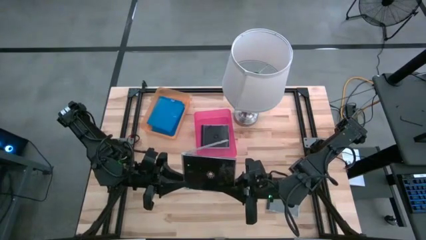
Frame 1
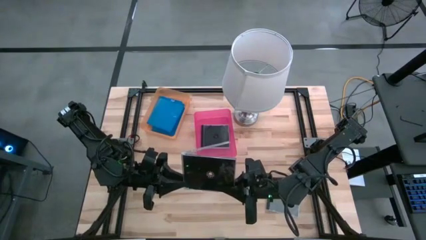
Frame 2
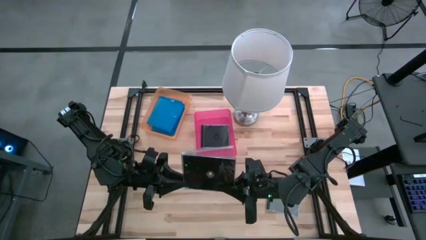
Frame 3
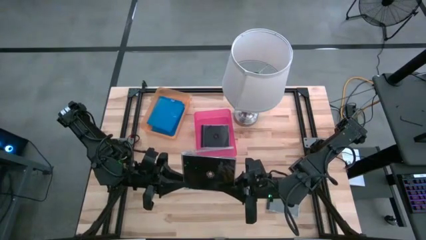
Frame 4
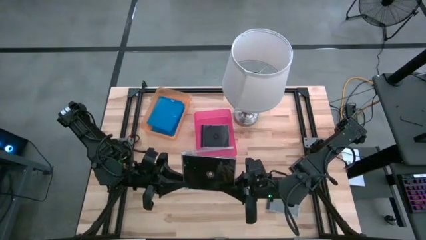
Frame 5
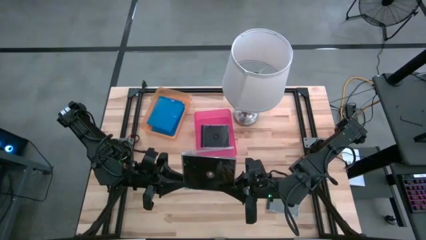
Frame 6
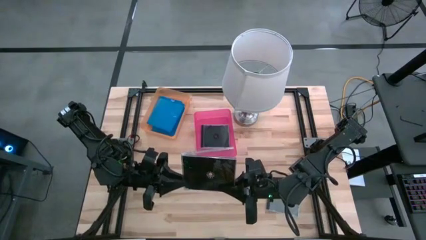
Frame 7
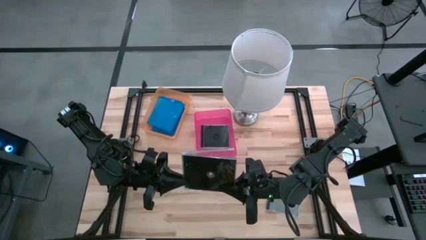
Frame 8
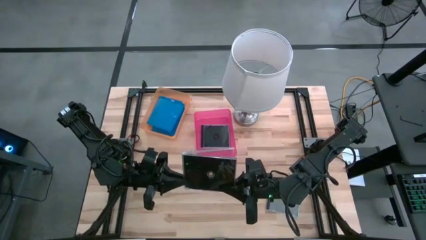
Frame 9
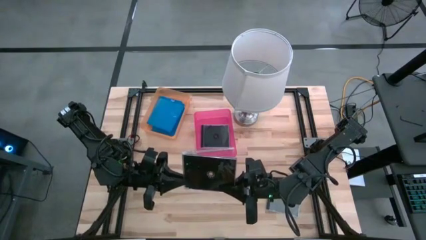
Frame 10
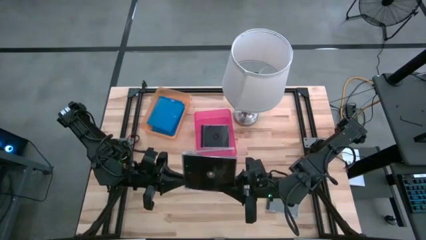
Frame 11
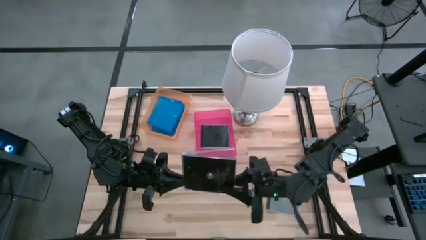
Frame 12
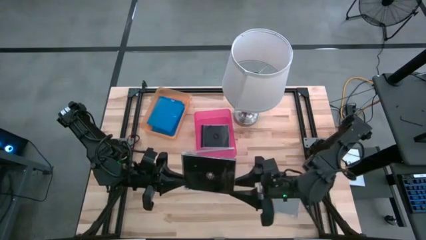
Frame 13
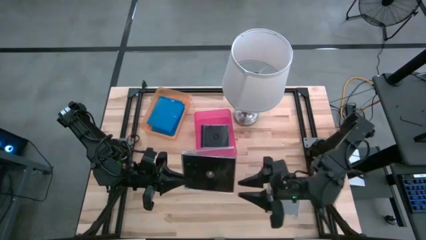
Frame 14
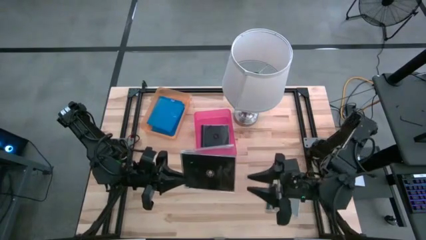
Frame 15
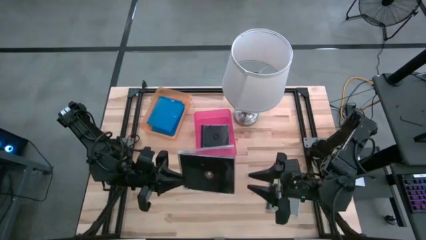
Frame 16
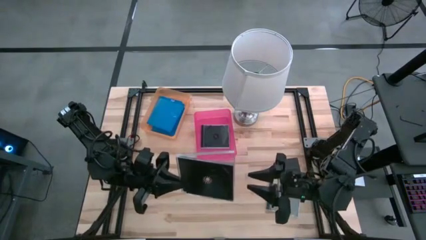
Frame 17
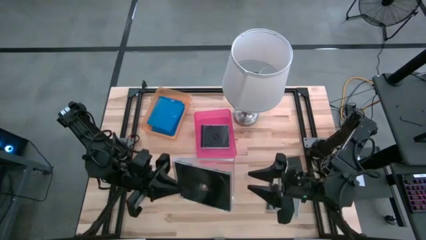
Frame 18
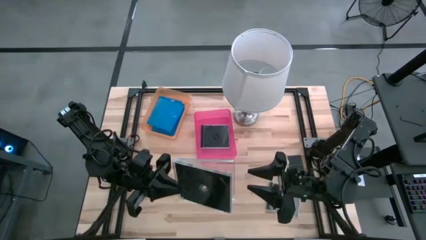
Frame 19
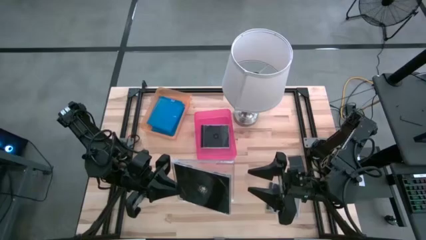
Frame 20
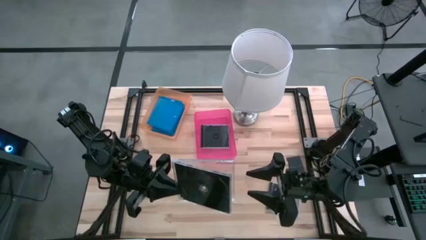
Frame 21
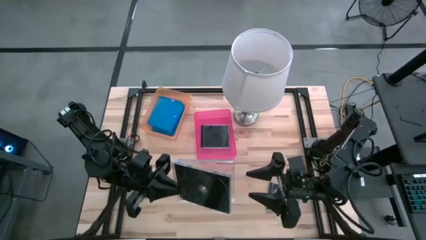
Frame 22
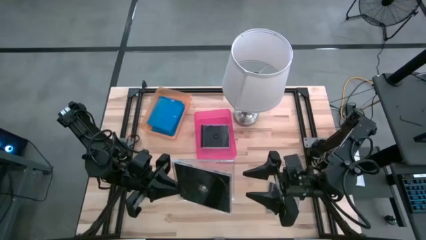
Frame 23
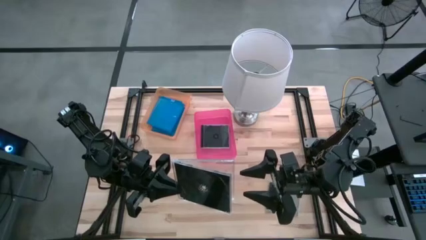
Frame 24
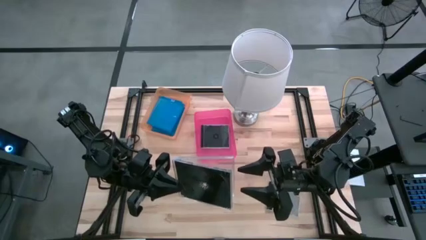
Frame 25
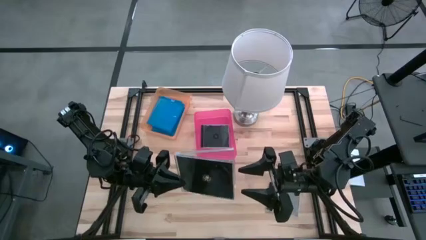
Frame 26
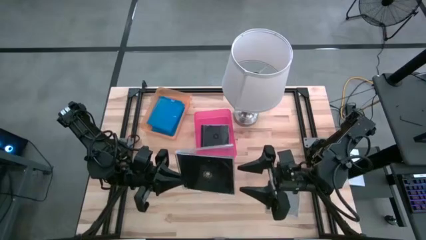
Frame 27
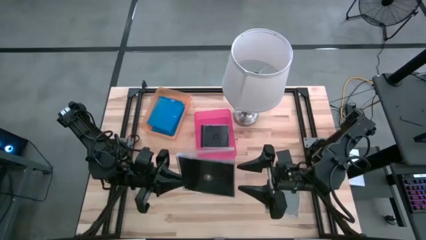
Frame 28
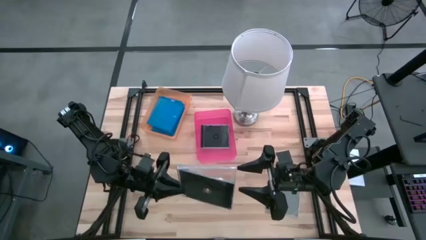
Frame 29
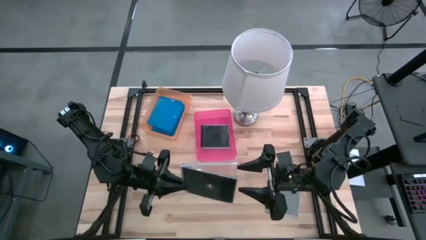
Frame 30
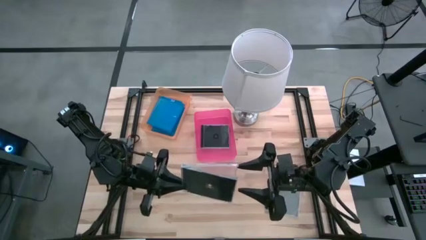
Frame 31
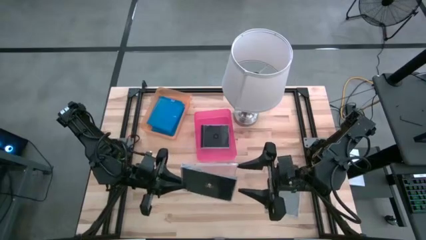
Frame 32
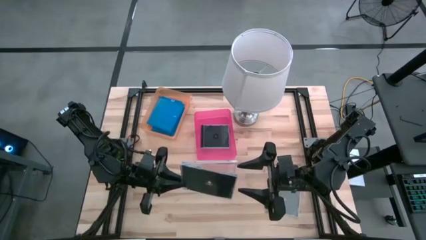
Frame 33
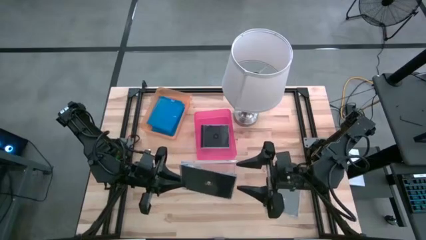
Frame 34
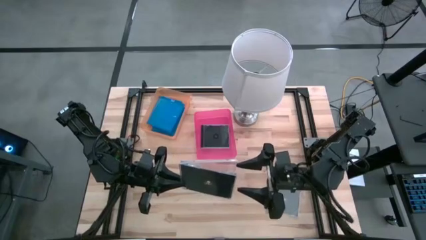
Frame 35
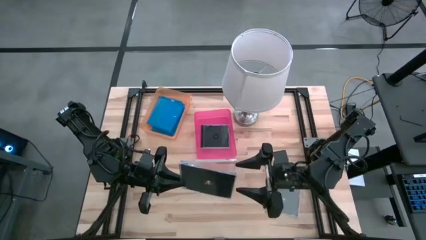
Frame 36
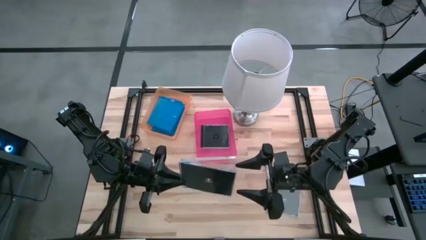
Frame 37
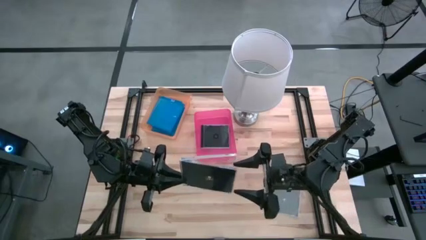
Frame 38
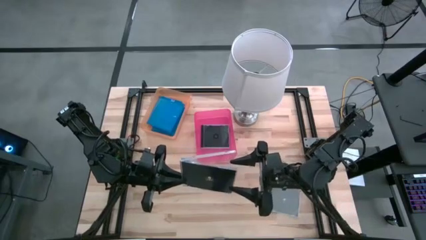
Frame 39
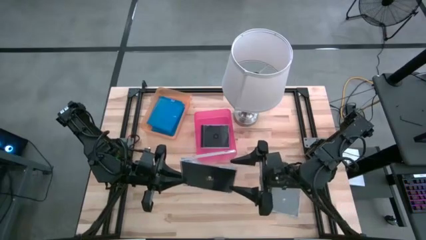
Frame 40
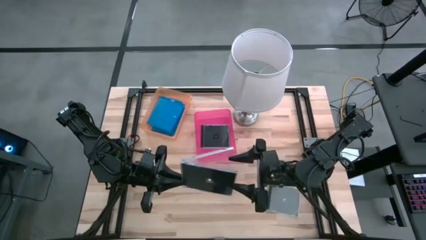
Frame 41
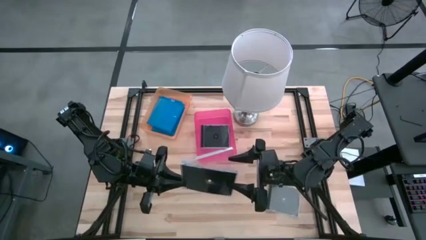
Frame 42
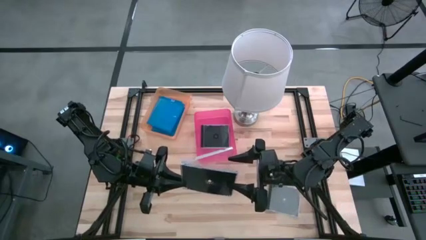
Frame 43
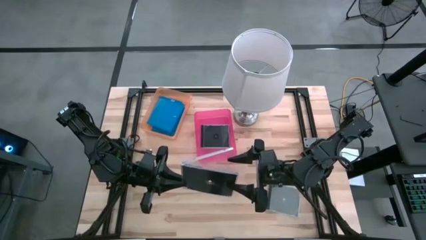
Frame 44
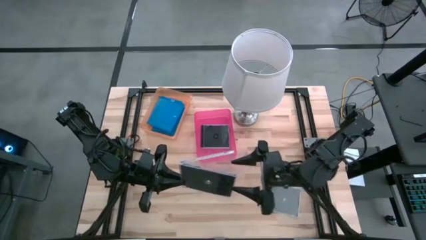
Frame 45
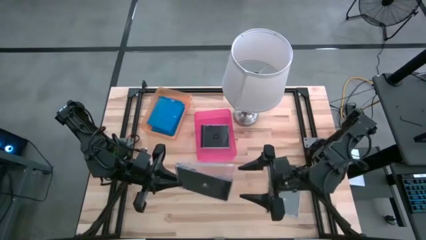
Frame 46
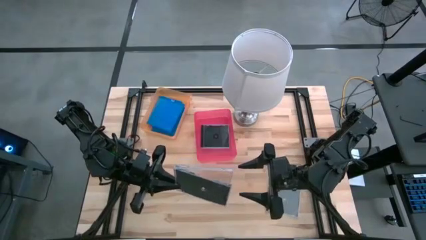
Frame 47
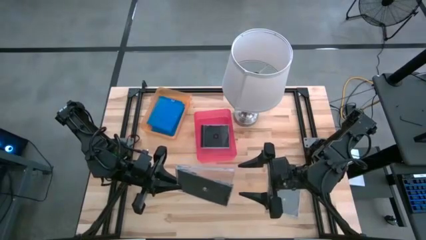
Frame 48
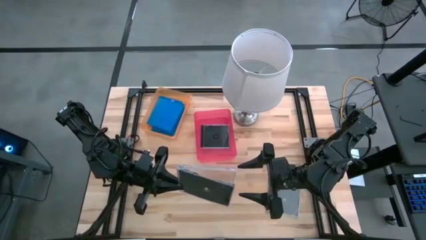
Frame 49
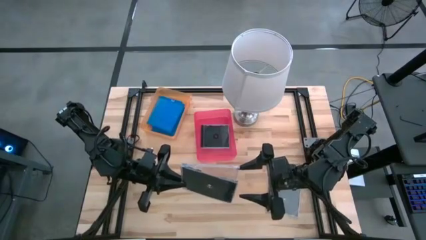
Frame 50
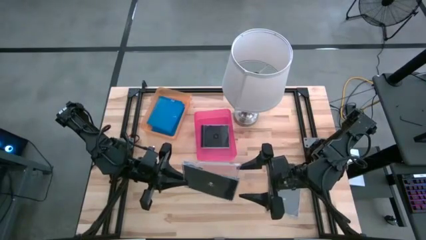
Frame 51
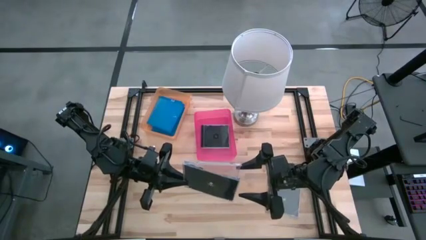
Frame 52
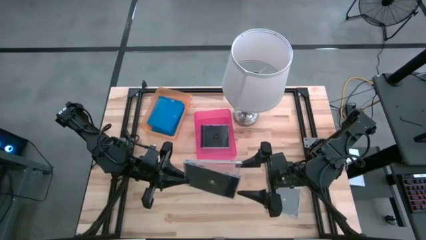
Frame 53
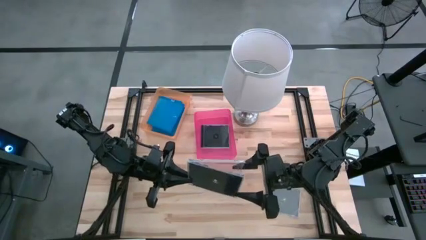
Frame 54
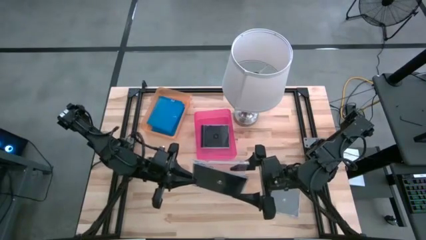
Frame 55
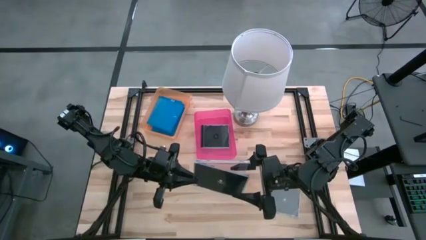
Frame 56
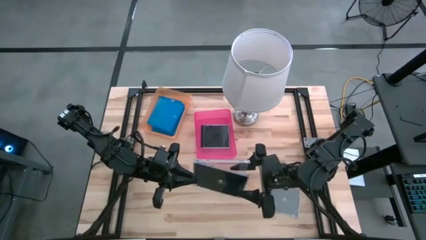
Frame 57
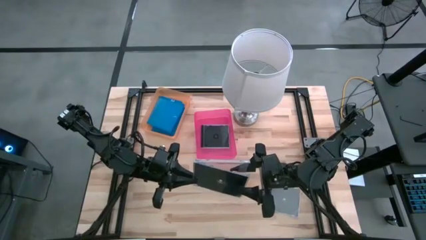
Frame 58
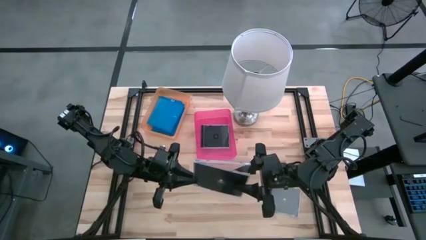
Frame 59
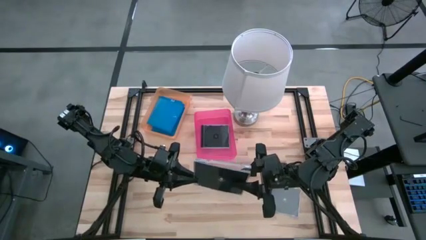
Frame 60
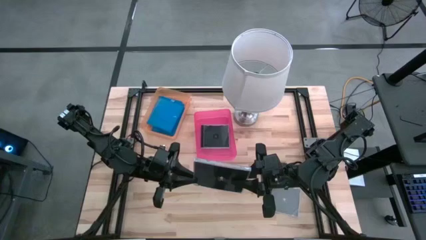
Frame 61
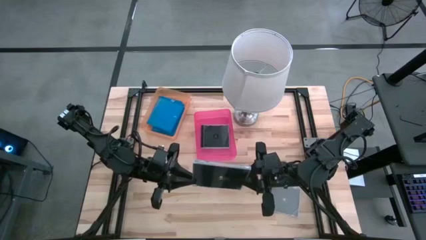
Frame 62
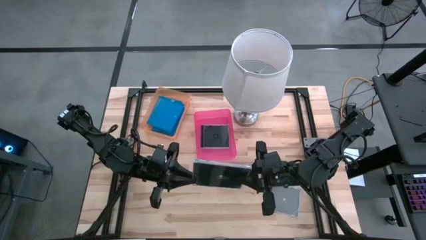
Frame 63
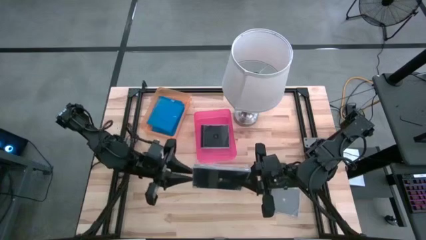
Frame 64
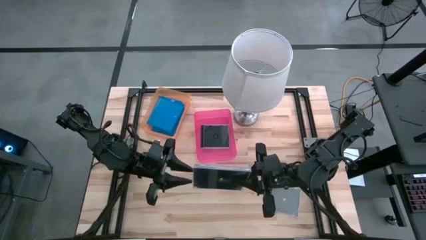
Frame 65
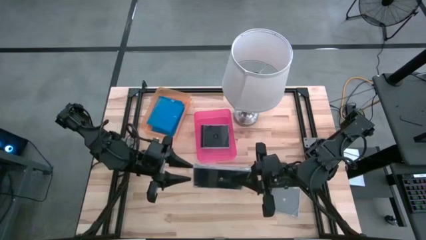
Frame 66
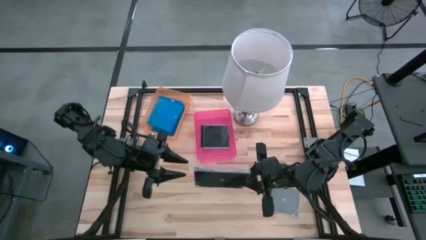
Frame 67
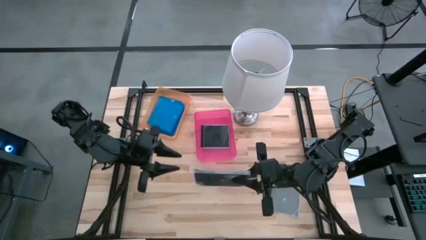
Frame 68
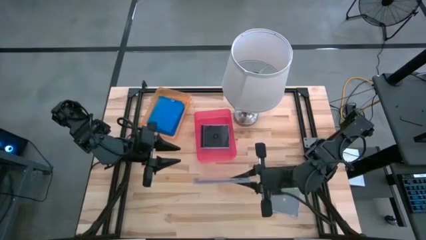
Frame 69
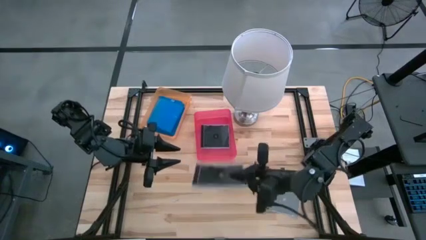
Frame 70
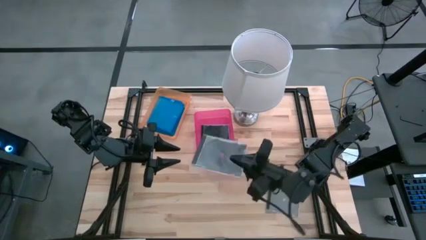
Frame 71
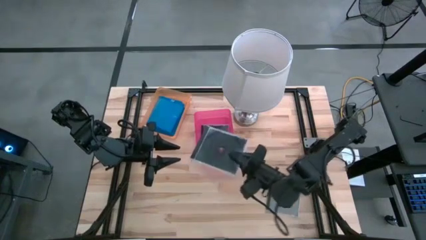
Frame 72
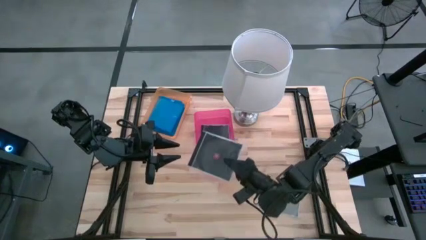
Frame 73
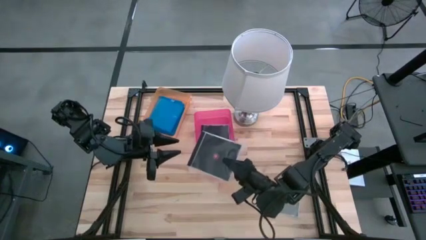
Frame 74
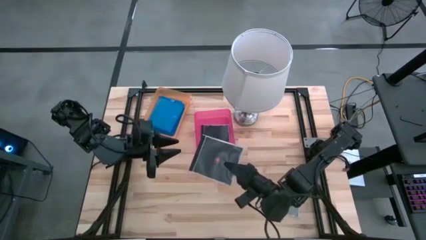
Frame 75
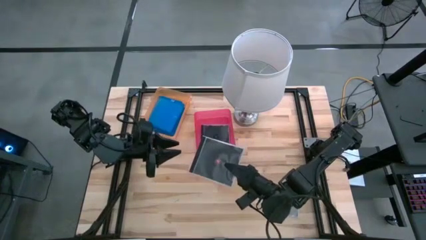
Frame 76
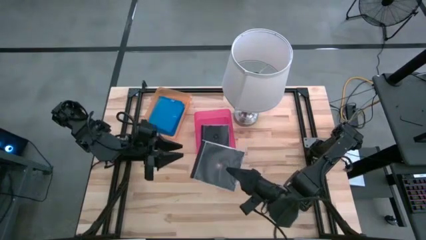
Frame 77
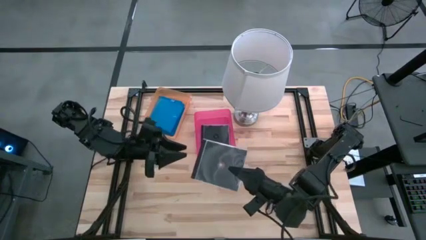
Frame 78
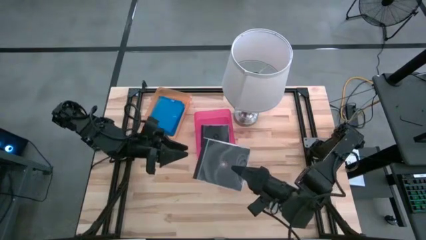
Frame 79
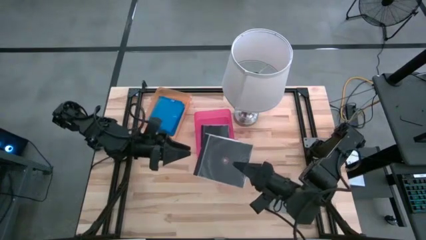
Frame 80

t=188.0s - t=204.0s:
Task: Pick & place jewel cases by type
Put the left black cd case into the pink bin
